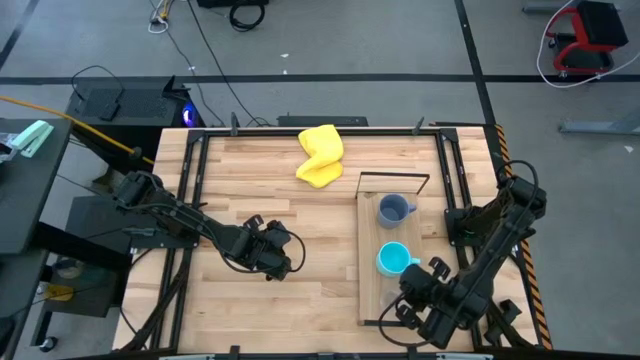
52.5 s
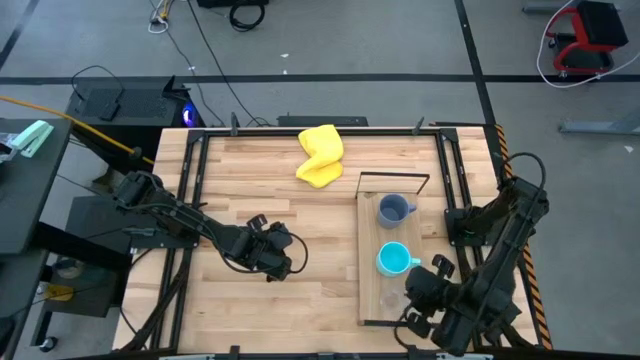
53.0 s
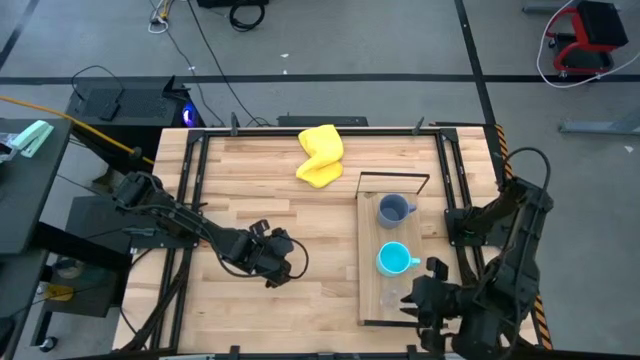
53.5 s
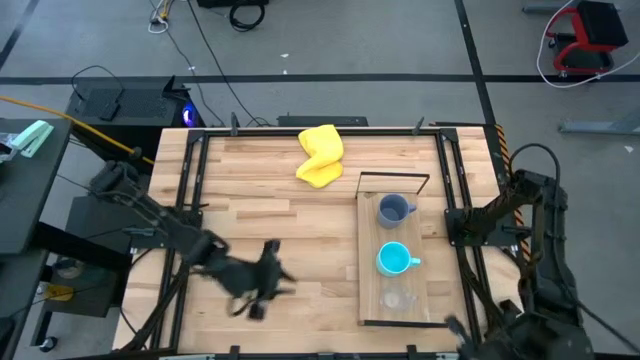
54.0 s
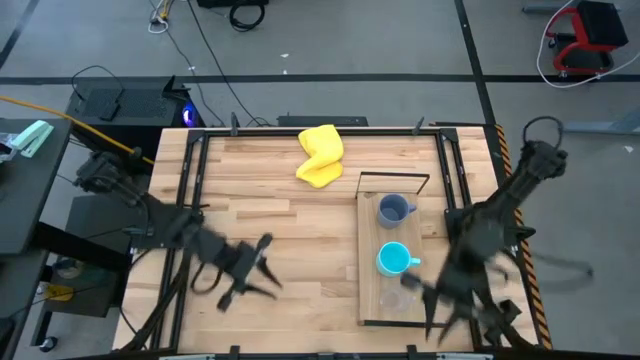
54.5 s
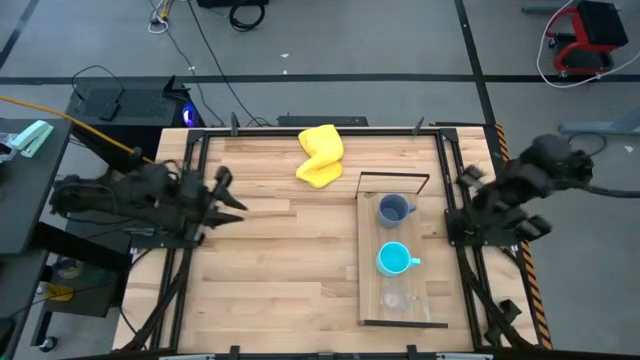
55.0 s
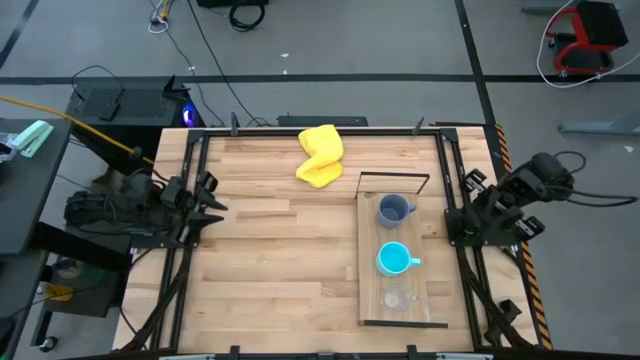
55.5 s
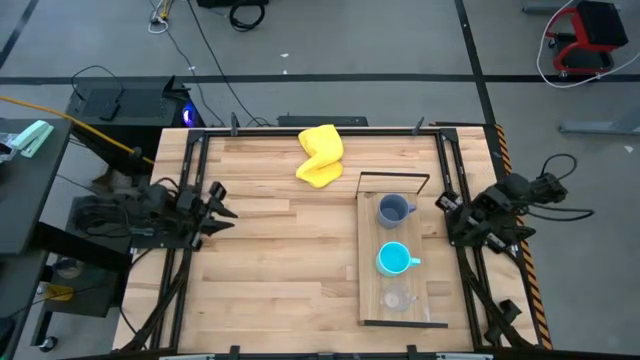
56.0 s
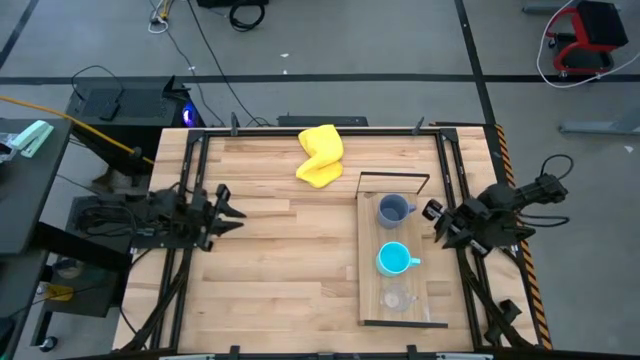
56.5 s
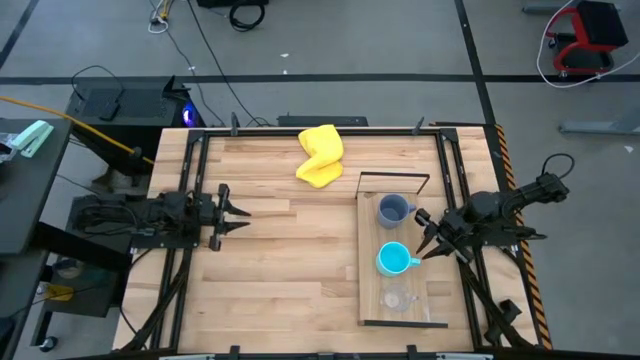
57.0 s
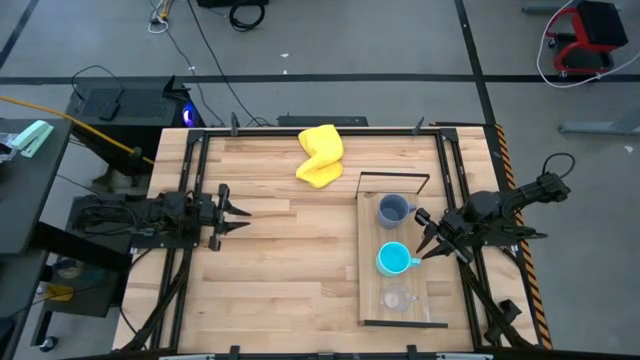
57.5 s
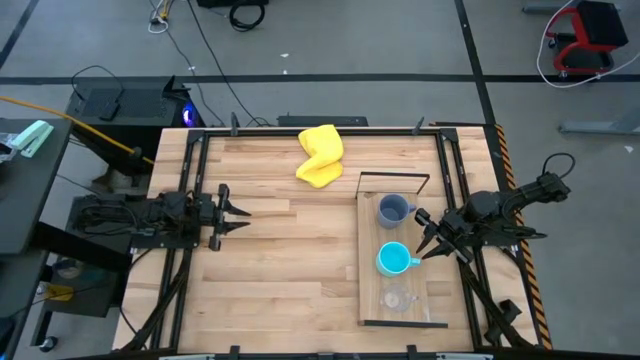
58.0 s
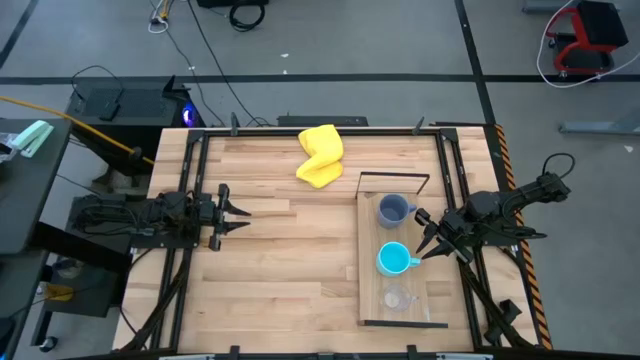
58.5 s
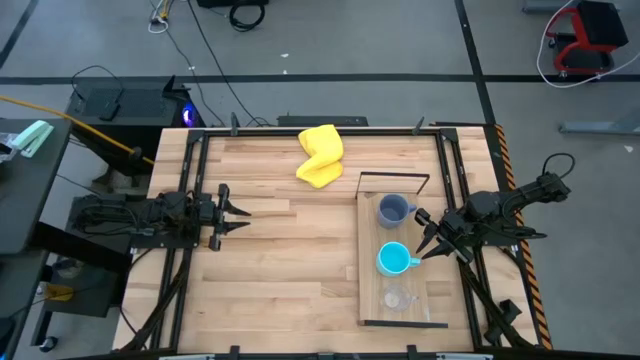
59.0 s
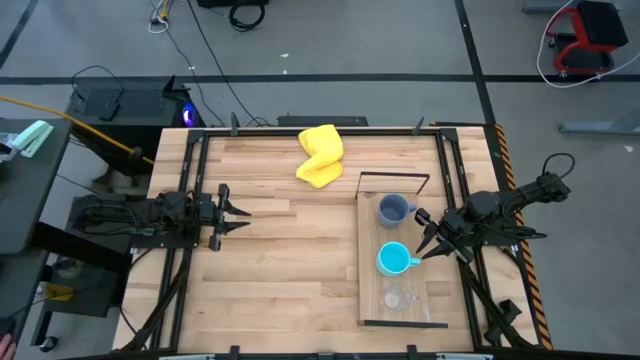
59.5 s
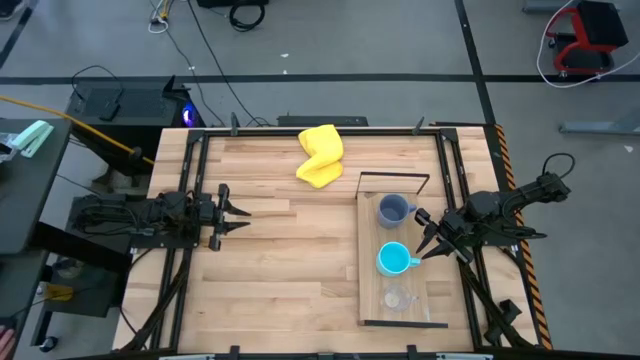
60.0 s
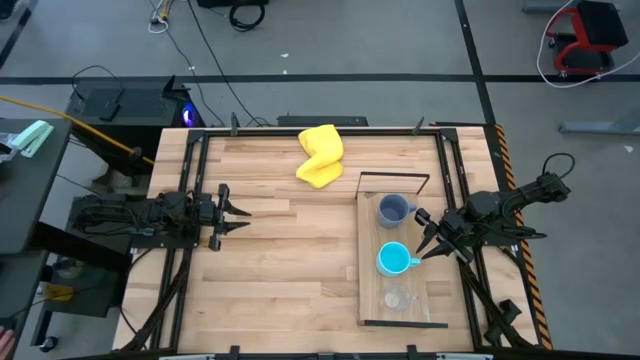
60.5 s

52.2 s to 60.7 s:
Task: Stack small to large cups/mugs on shelf
Return to Home Position

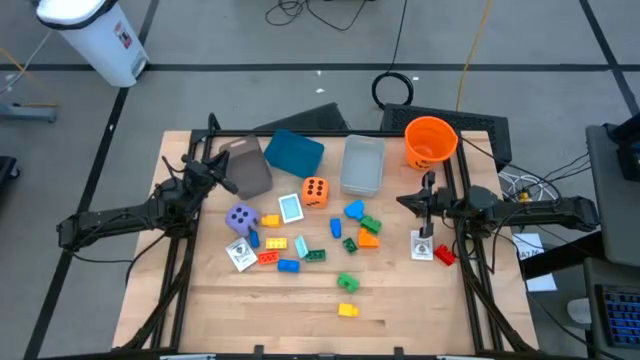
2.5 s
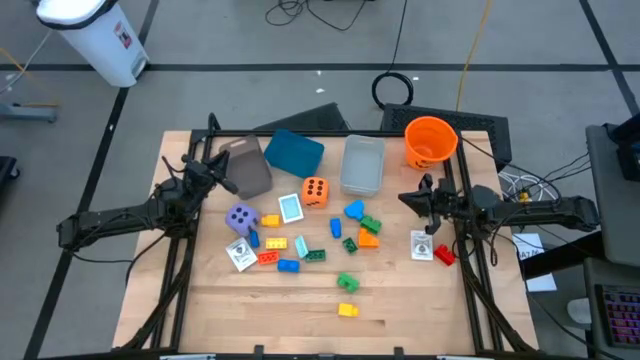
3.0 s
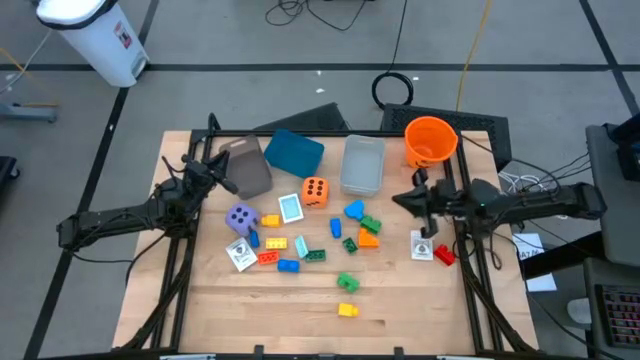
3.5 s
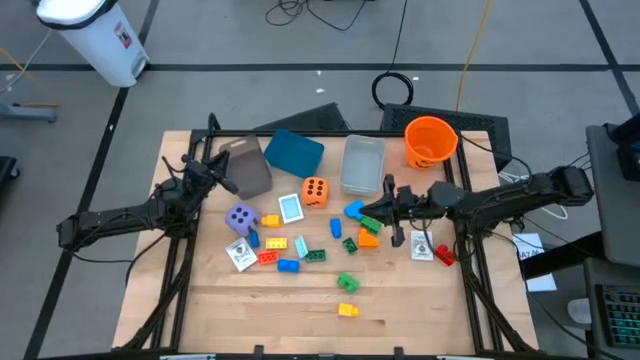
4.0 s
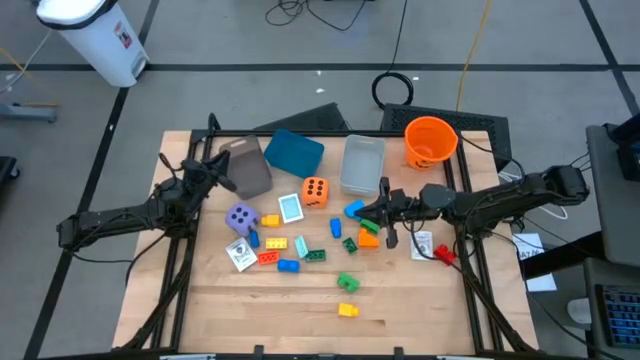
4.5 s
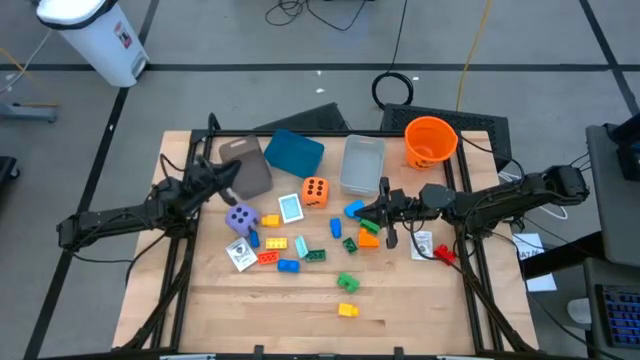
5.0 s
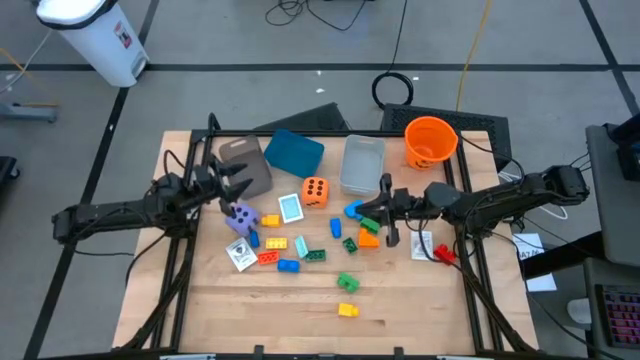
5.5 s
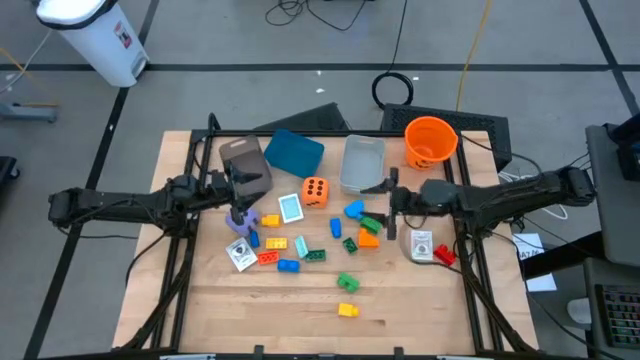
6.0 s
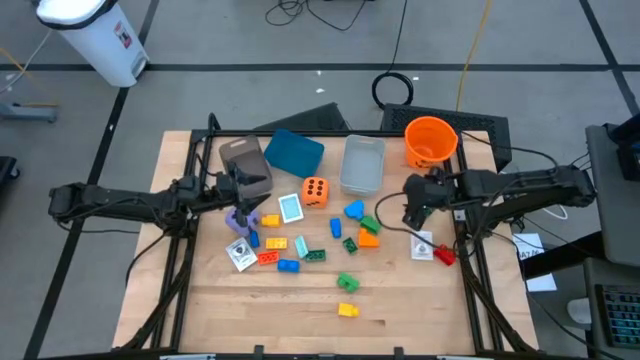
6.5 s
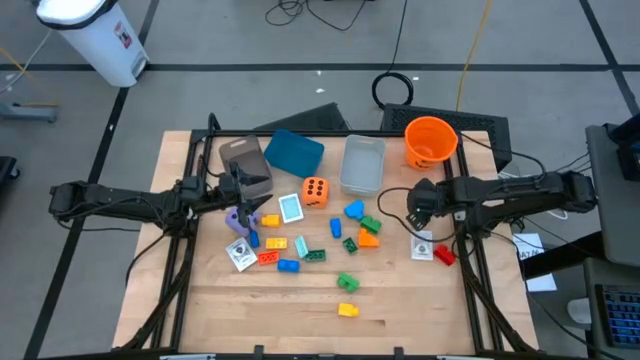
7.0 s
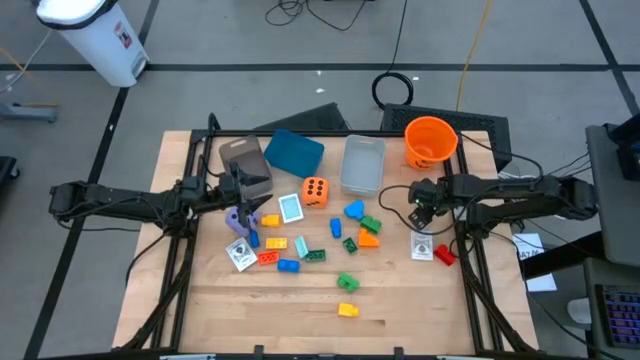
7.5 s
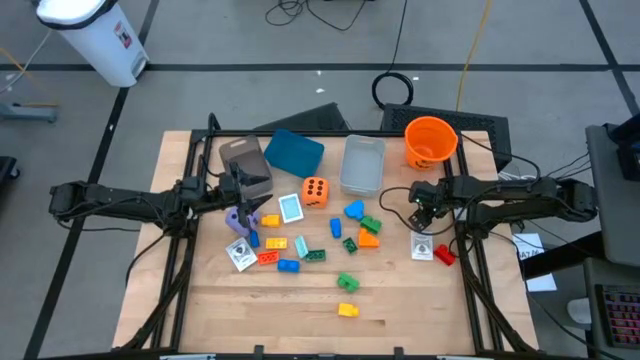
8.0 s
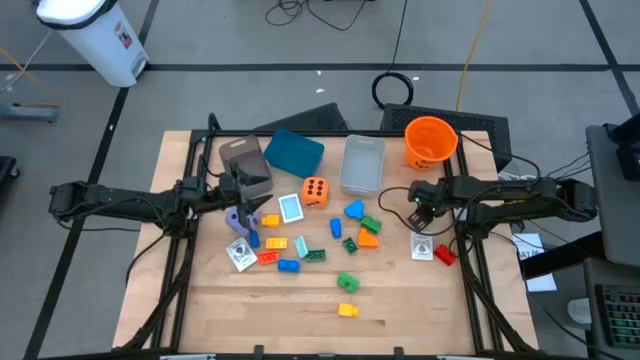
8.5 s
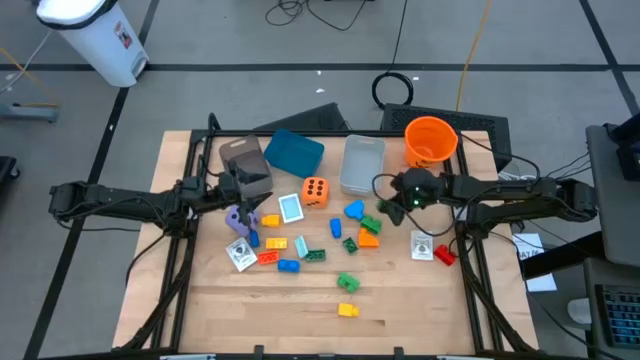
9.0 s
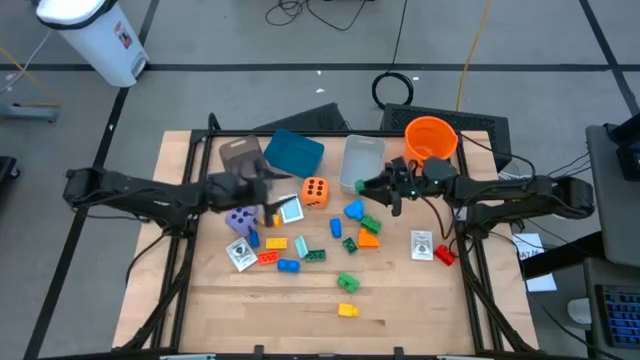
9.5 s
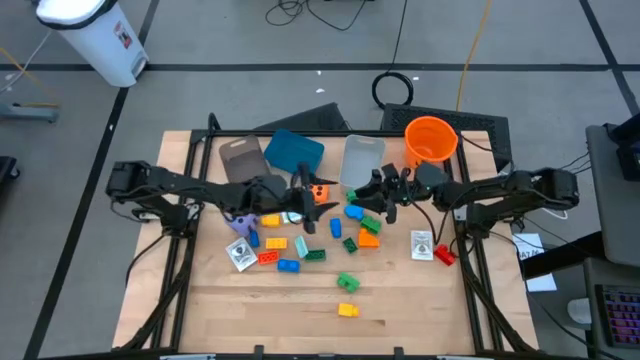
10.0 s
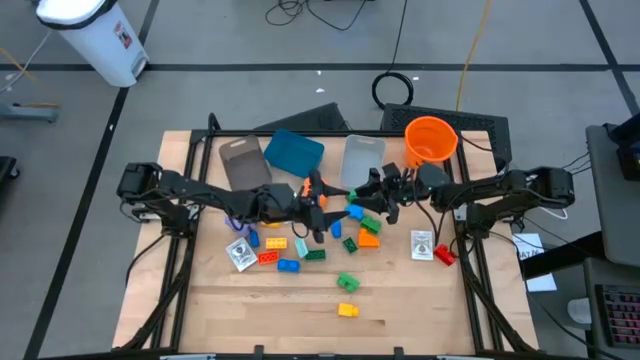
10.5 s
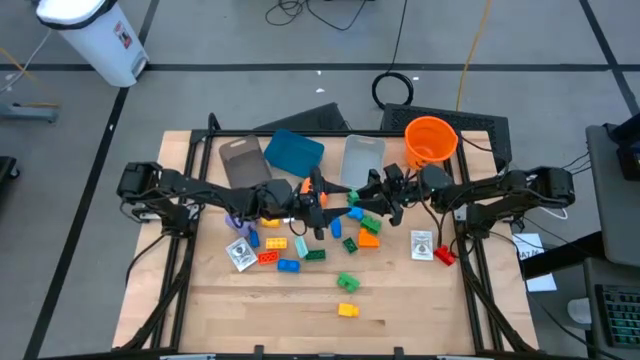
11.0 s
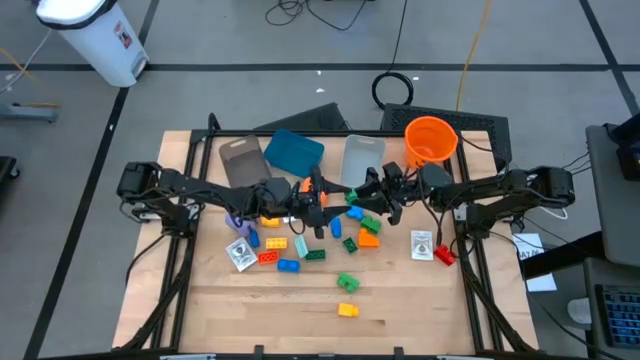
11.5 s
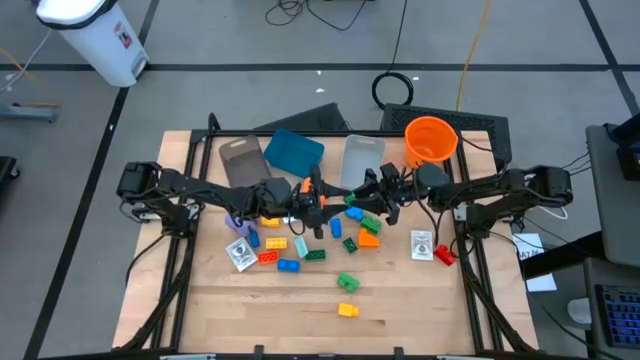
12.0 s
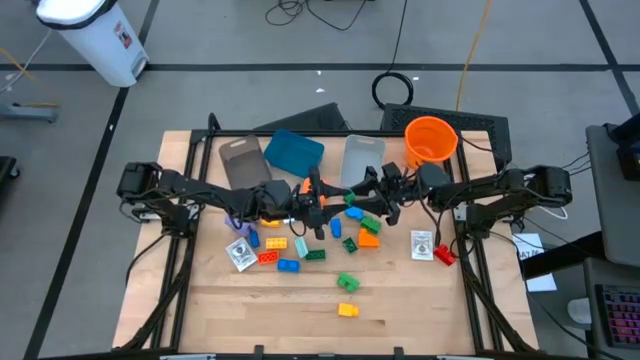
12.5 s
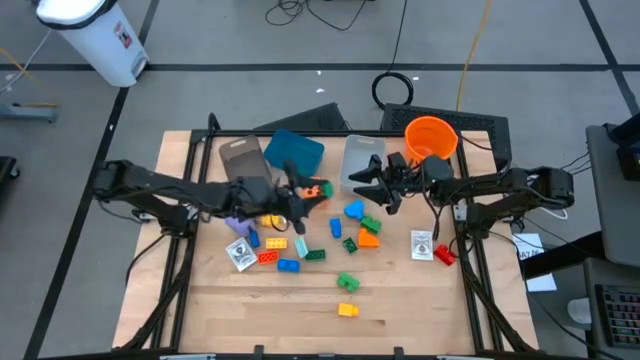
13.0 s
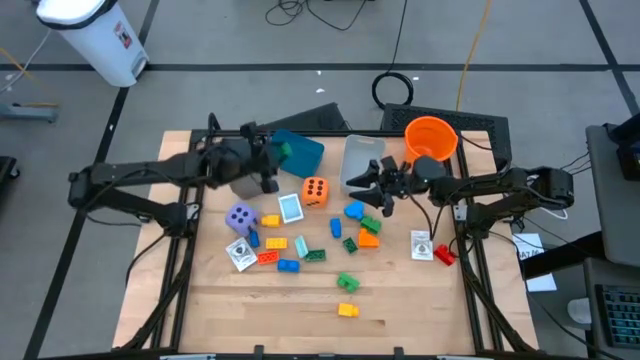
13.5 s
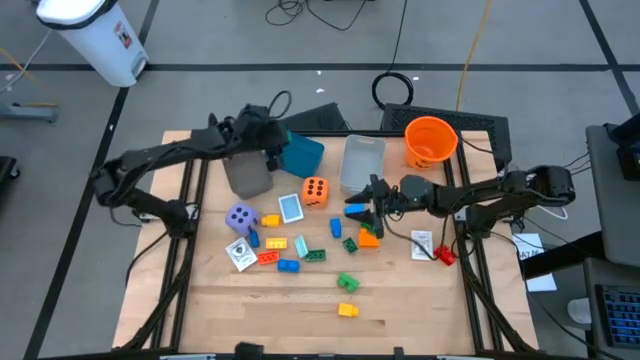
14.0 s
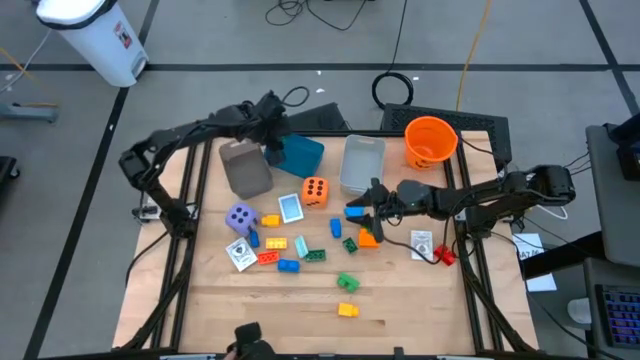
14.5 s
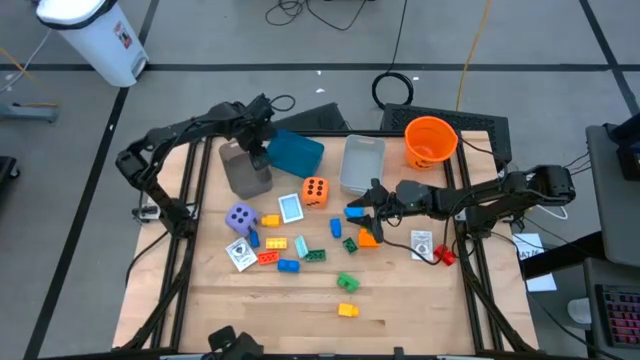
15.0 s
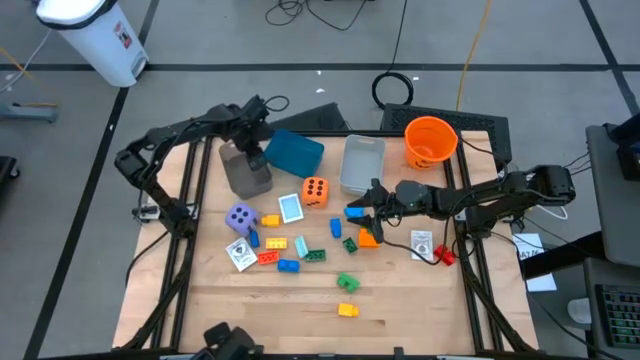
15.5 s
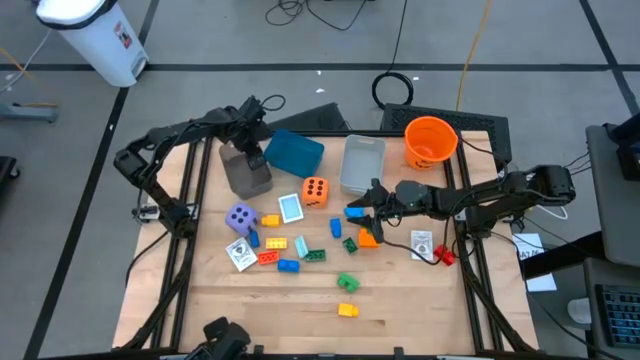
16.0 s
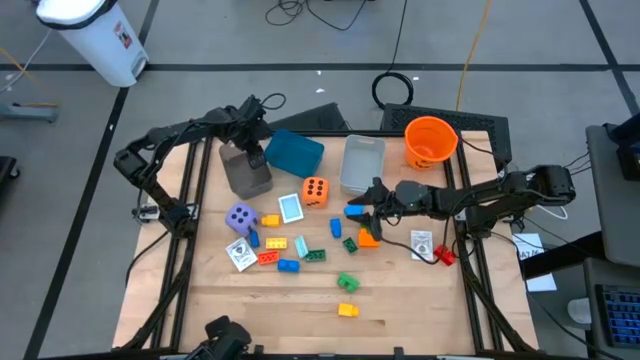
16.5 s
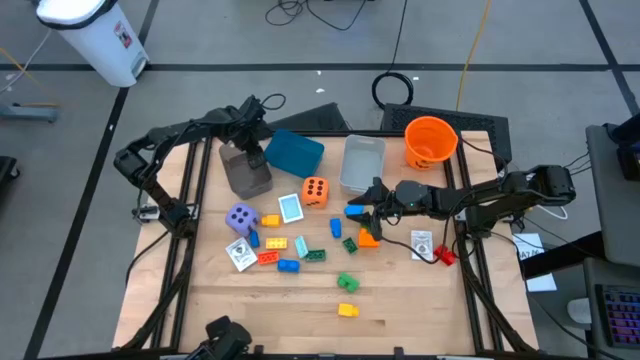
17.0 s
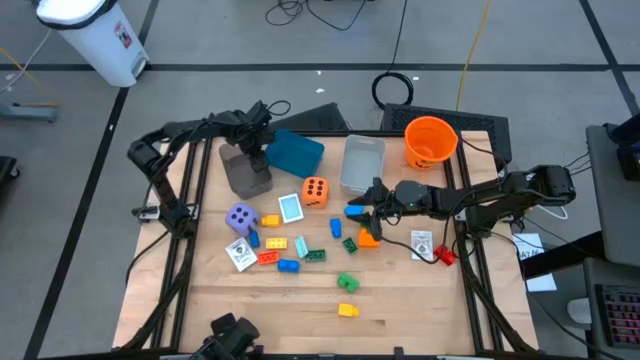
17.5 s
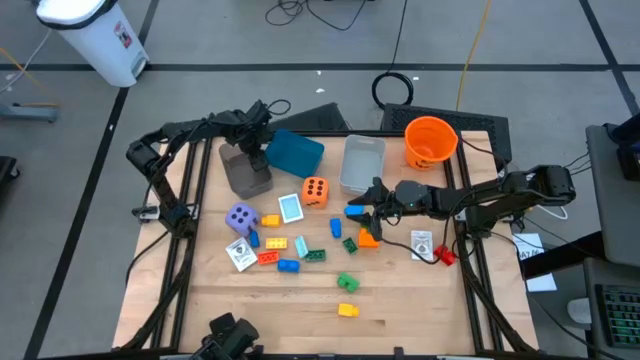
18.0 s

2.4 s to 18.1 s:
Task: Pick & Place Toys
Put the green game piece into the black bin
